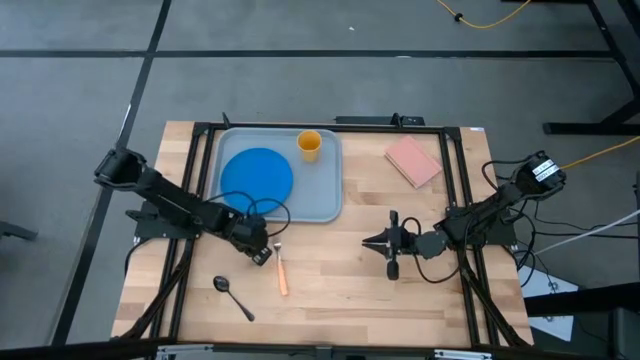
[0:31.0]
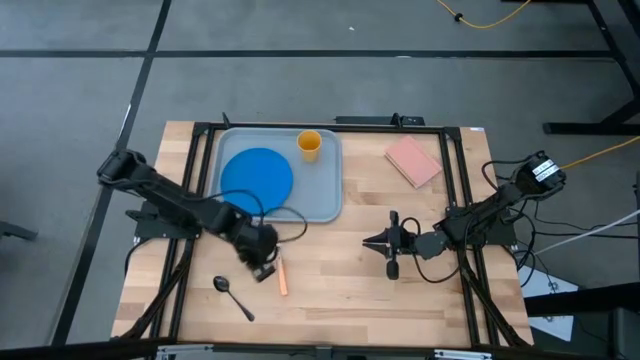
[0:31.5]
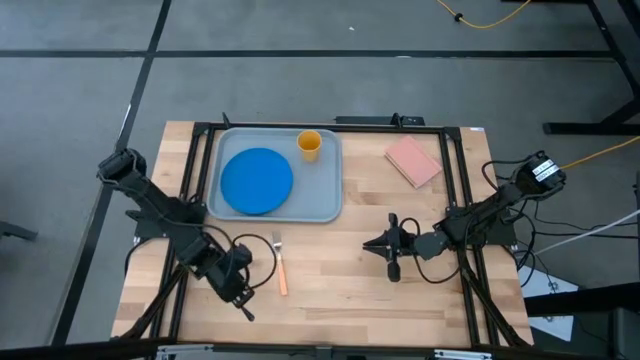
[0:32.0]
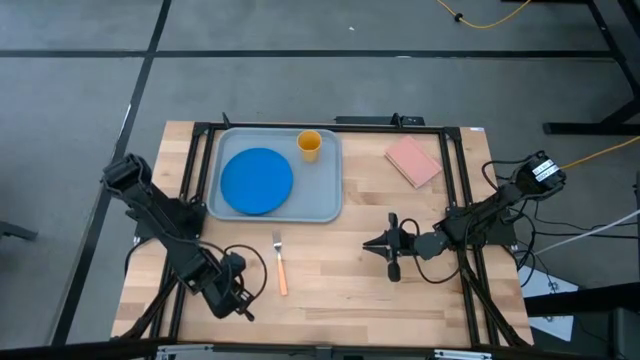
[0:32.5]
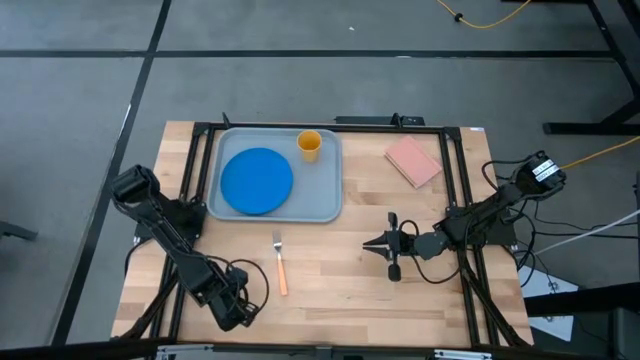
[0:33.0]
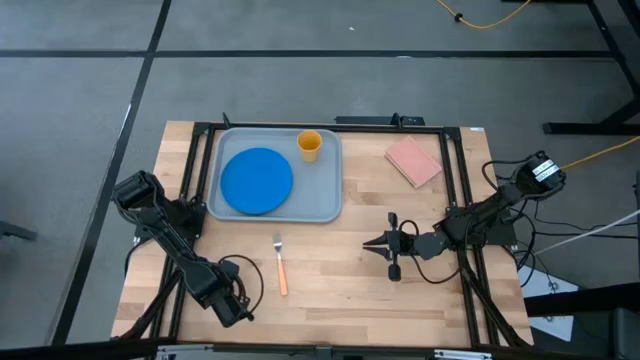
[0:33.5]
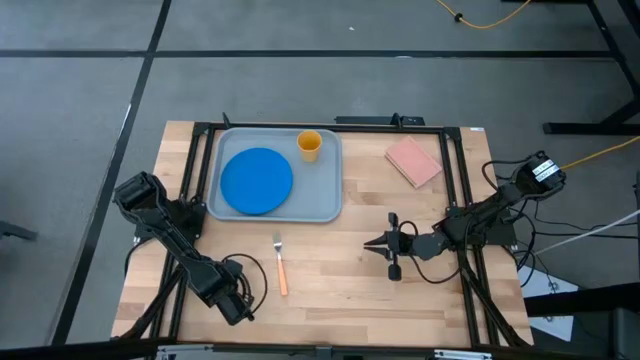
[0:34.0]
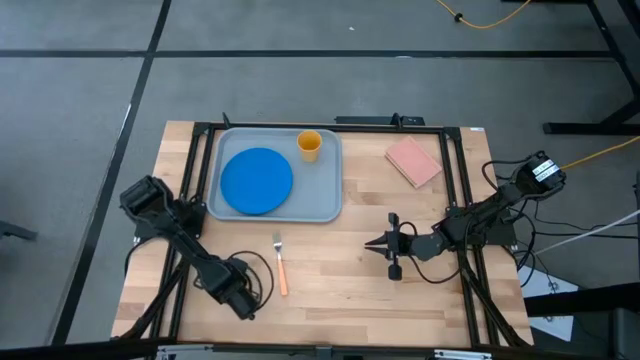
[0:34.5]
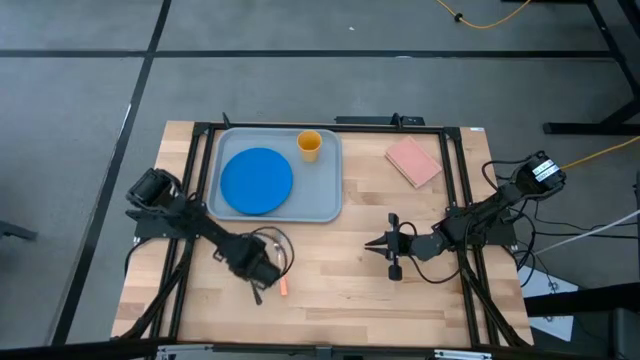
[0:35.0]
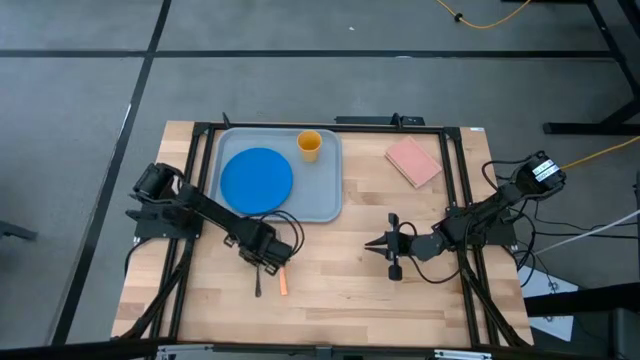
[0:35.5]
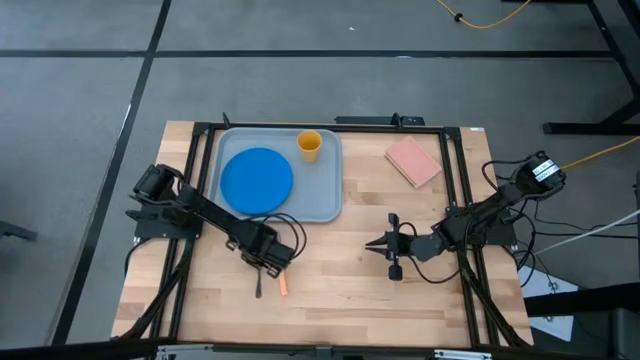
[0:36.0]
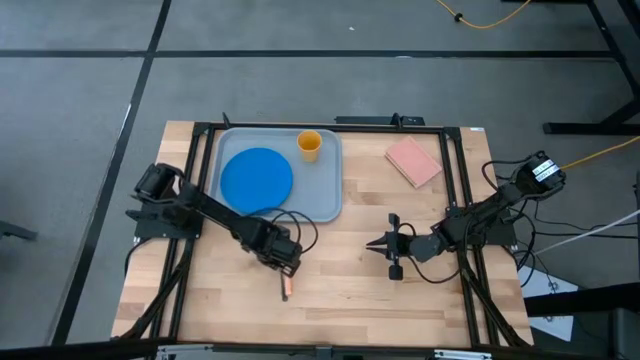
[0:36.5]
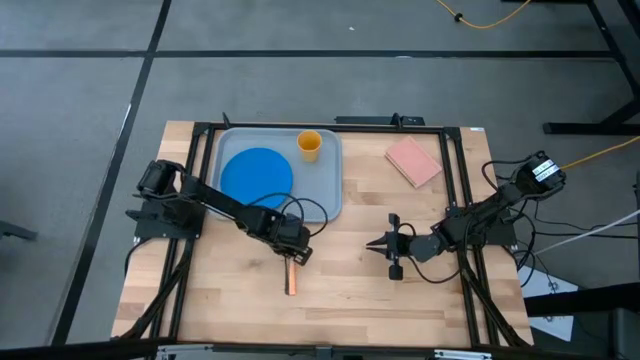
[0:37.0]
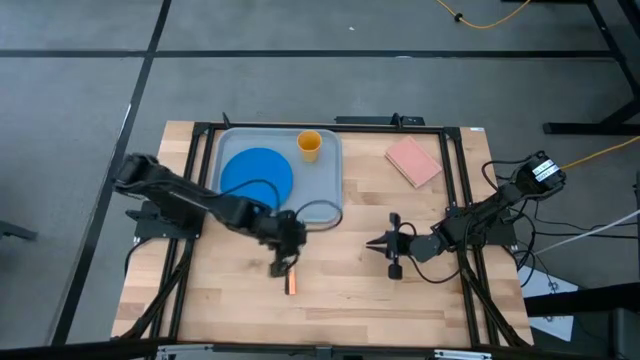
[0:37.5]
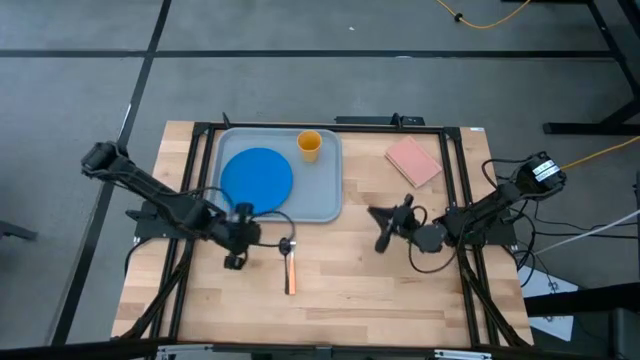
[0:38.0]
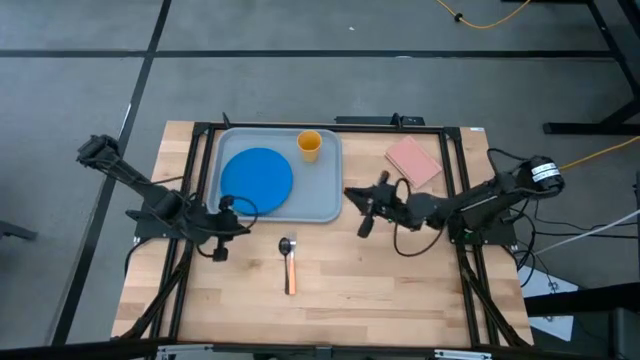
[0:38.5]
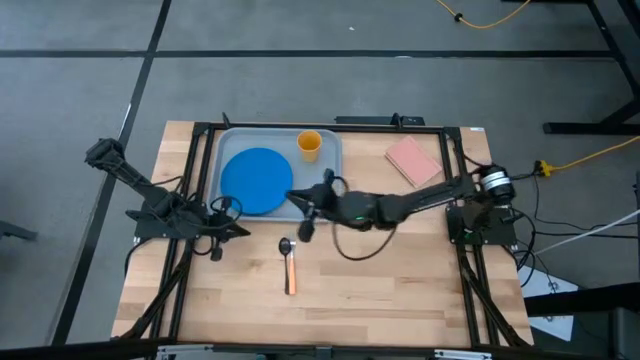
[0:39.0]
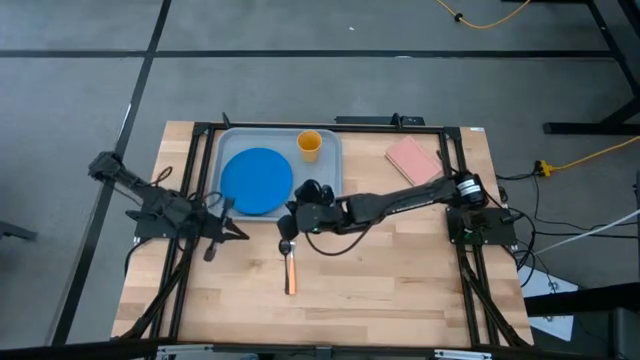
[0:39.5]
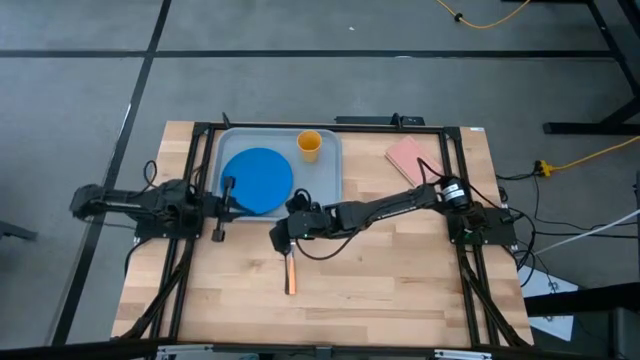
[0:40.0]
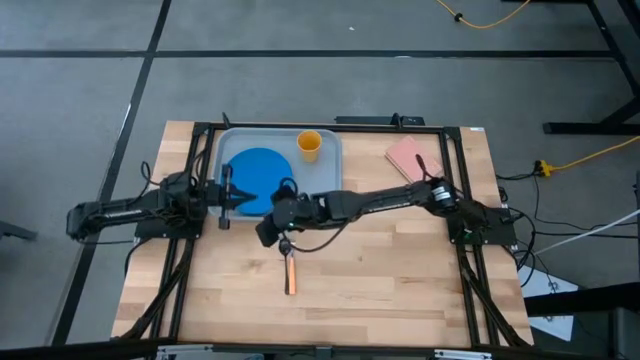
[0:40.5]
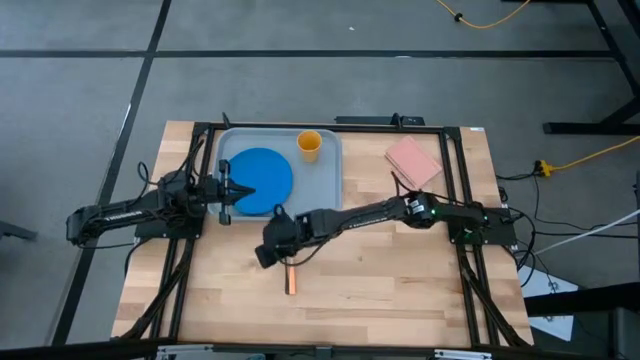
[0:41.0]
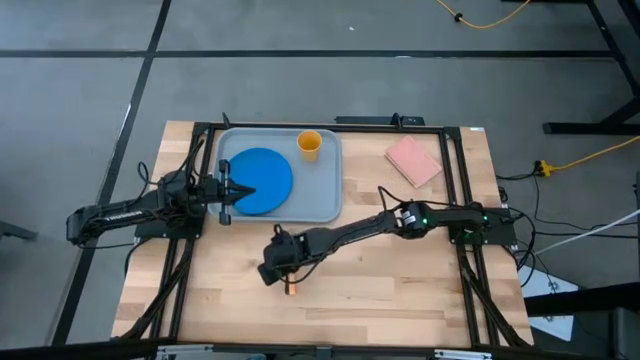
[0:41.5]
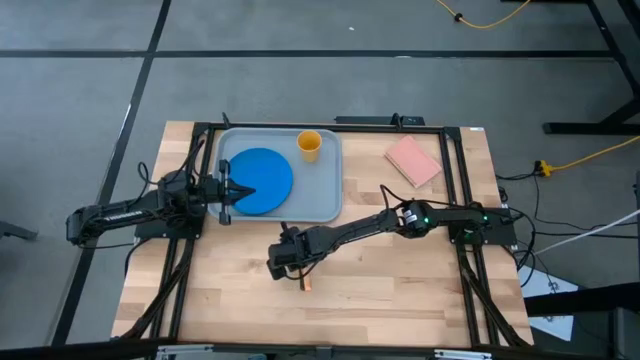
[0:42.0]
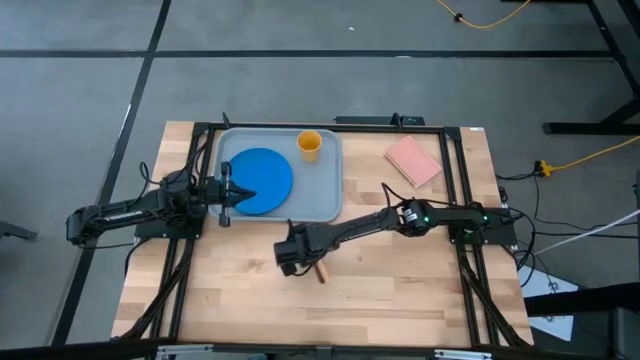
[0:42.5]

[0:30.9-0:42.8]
Task: Pick and place plate/cup/fork/spoon on tray
Move the black spoon to the center of the table

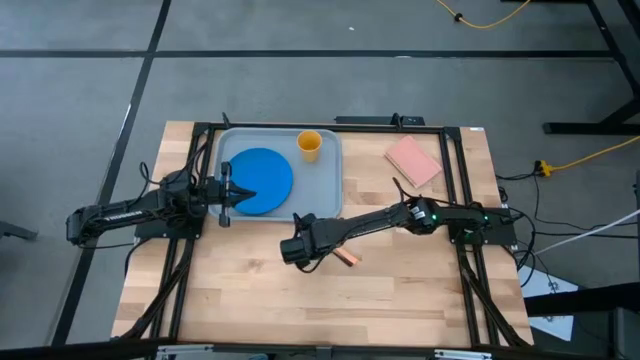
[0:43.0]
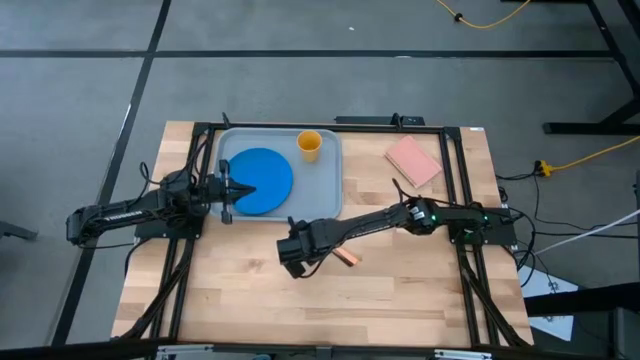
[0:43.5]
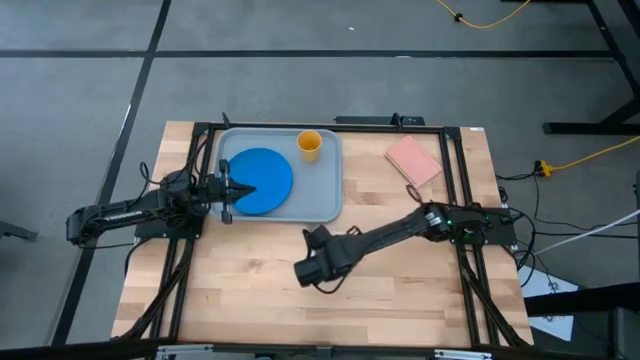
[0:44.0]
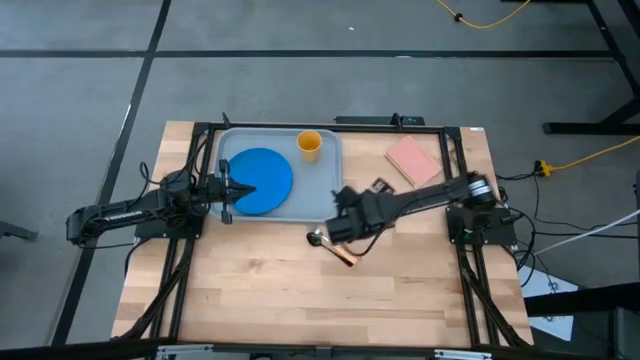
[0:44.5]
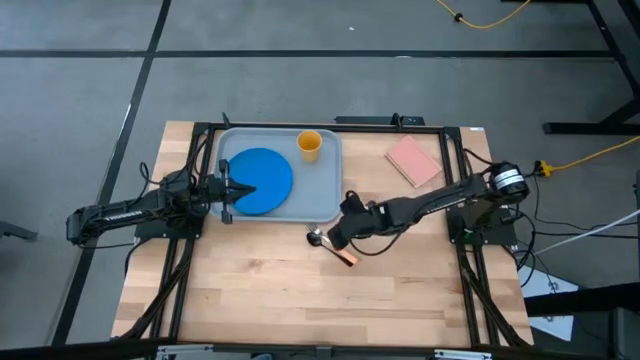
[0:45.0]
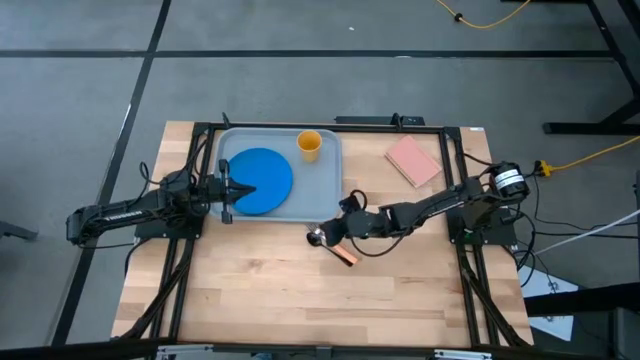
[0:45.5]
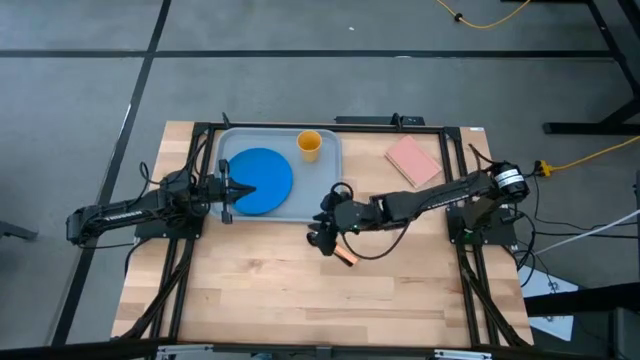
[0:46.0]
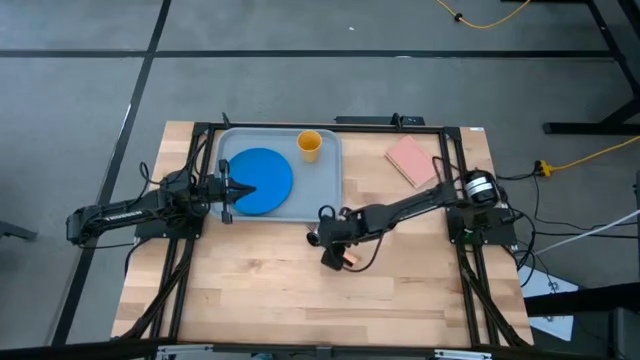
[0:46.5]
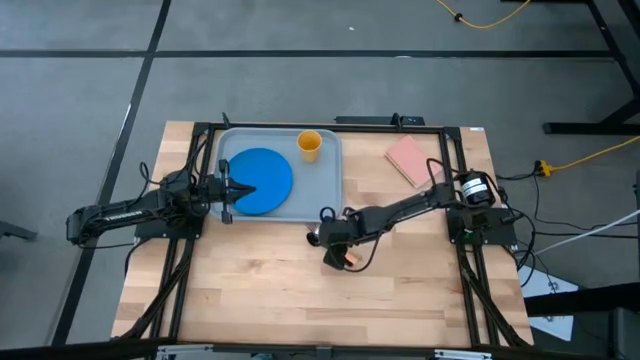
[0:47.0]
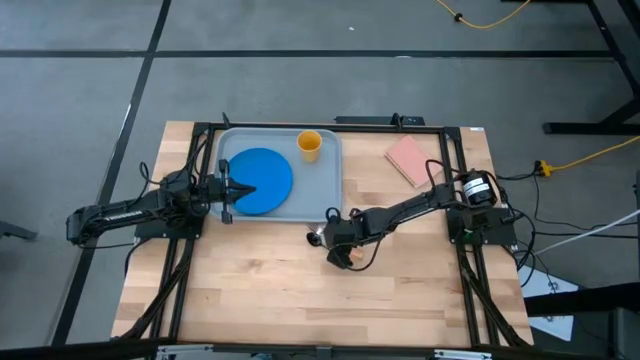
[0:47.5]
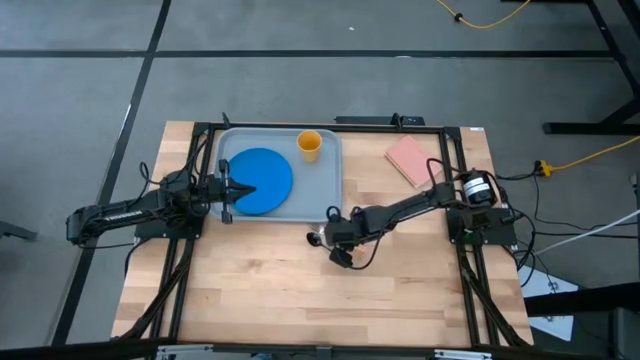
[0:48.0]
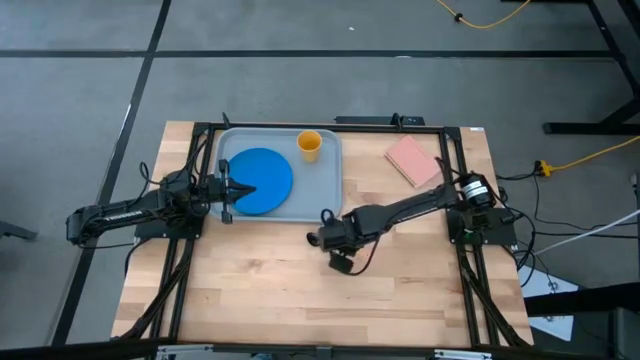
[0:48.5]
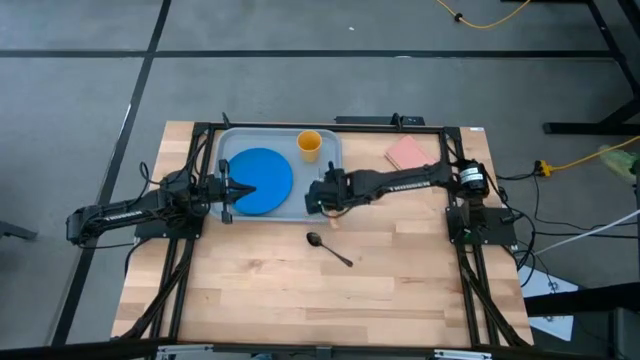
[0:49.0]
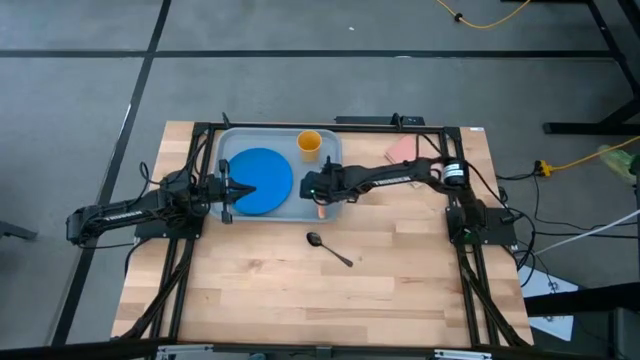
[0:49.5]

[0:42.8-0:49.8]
Put the light orange fork on the gray serving tray to the bottom right of the yellow cup

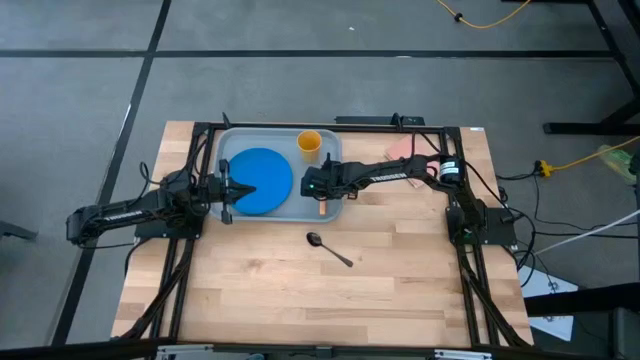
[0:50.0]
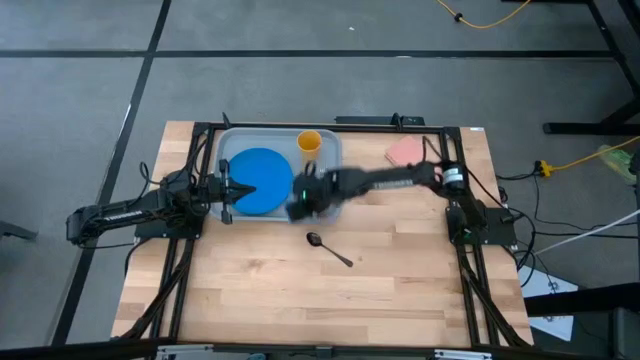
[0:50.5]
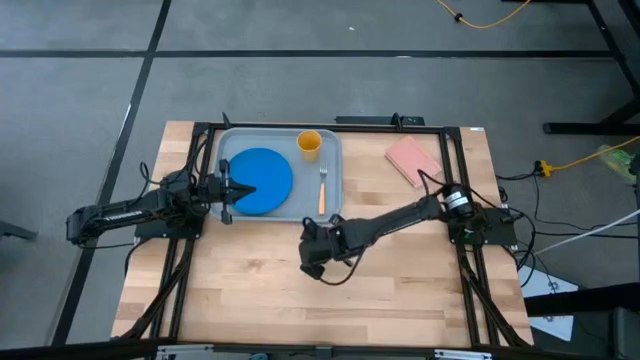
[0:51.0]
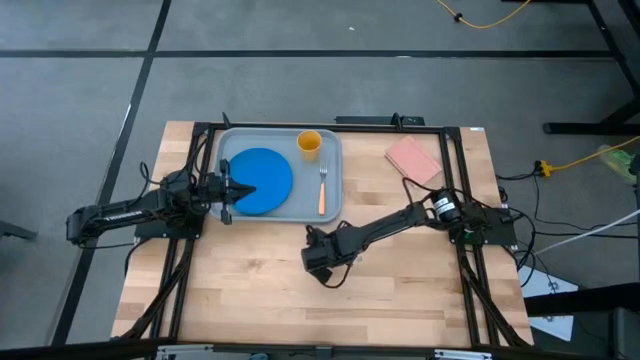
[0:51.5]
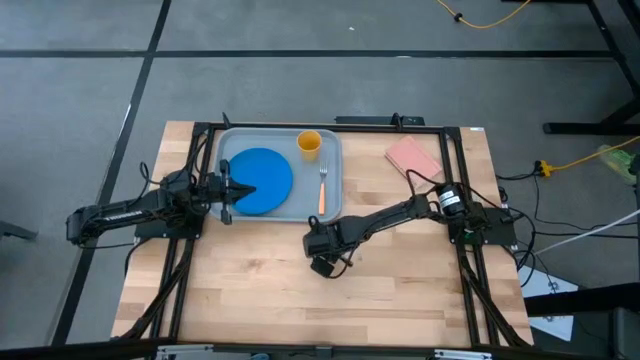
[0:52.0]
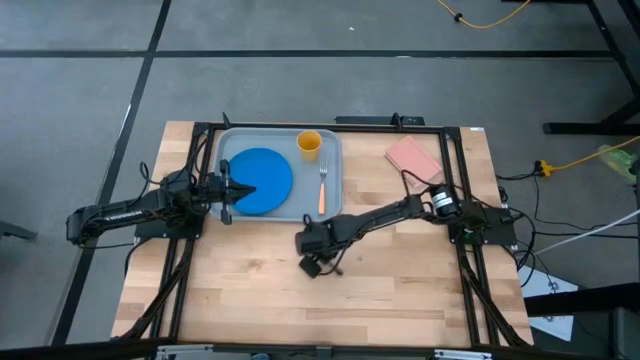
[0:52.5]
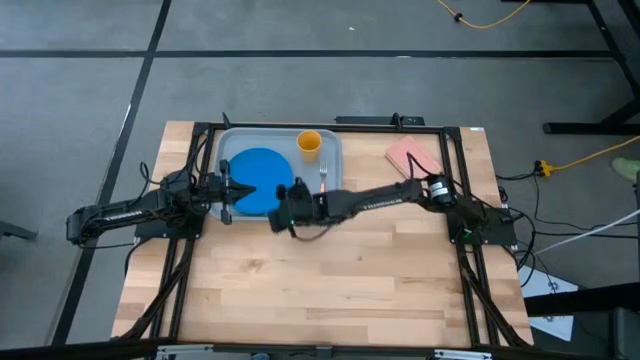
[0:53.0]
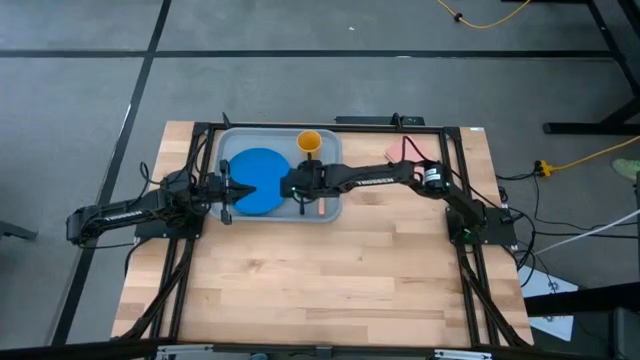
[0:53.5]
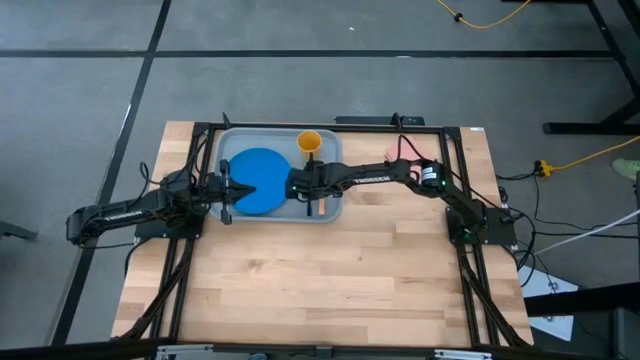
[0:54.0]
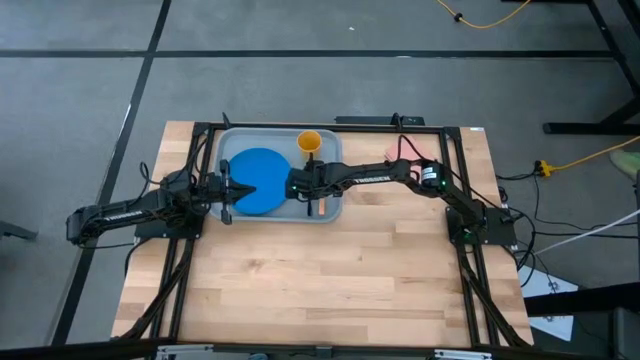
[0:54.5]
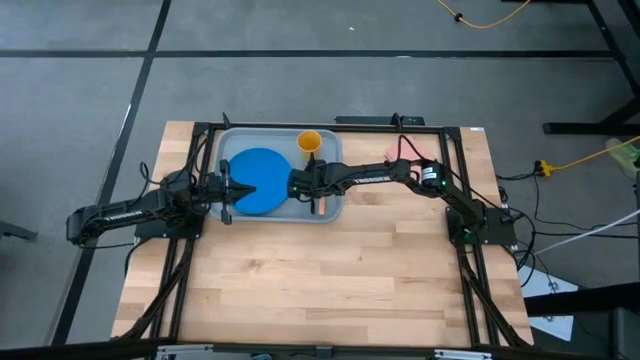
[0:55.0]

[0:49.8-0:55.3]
Put the black spoon on the gray serving tray to the left of the light orange fork
